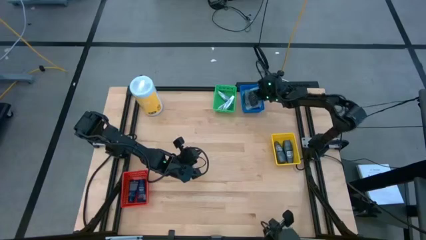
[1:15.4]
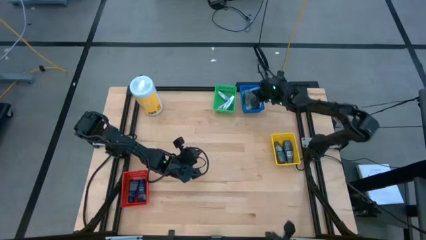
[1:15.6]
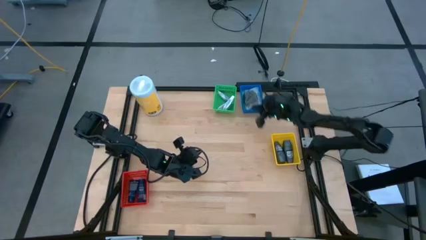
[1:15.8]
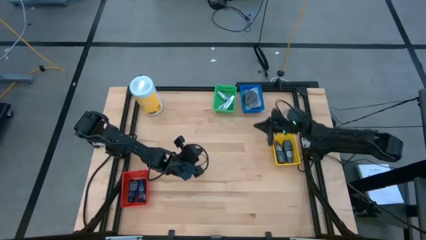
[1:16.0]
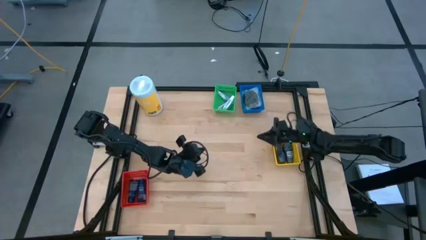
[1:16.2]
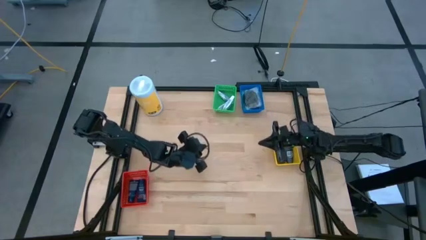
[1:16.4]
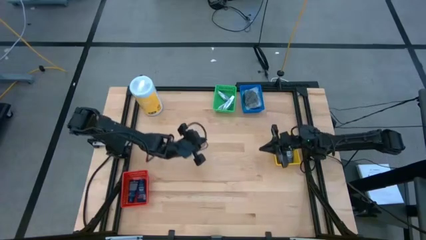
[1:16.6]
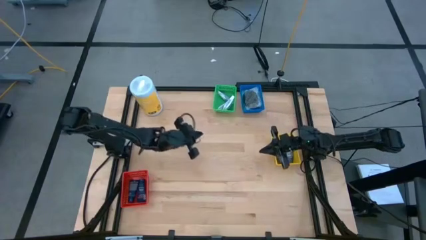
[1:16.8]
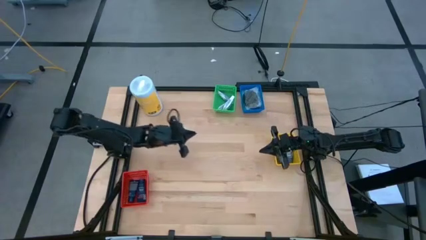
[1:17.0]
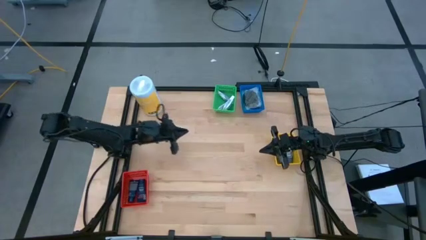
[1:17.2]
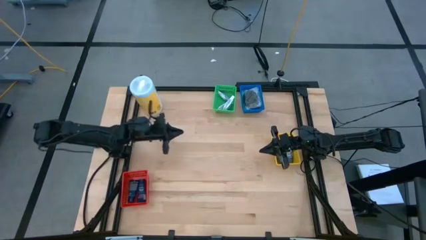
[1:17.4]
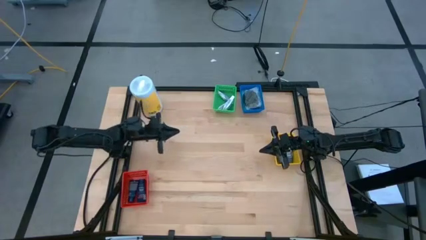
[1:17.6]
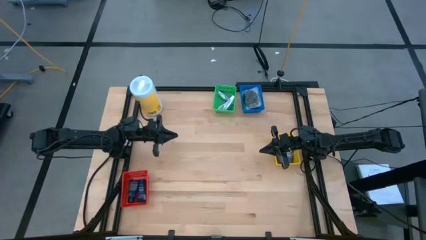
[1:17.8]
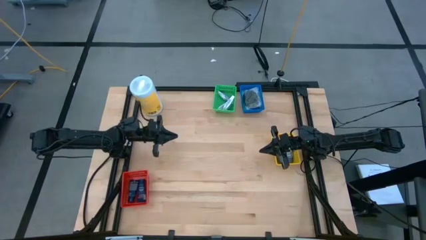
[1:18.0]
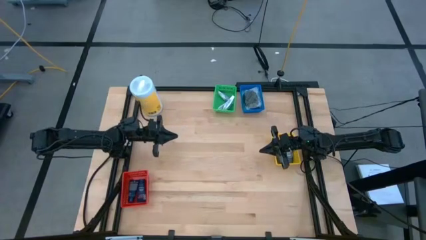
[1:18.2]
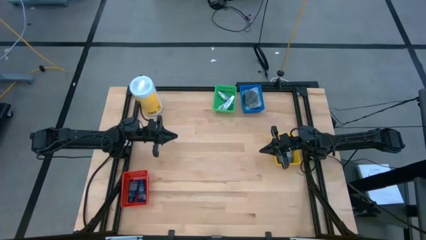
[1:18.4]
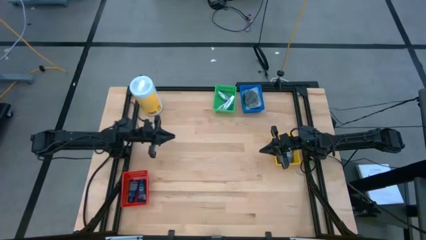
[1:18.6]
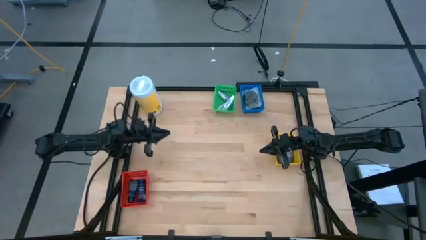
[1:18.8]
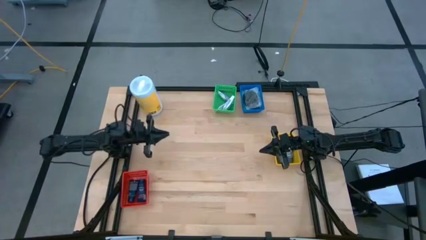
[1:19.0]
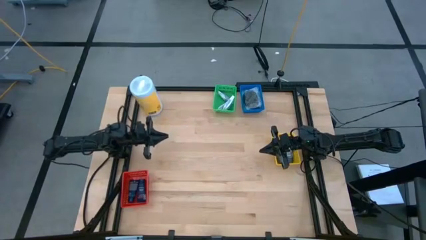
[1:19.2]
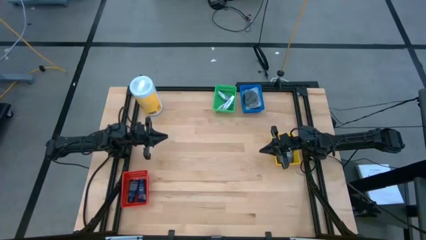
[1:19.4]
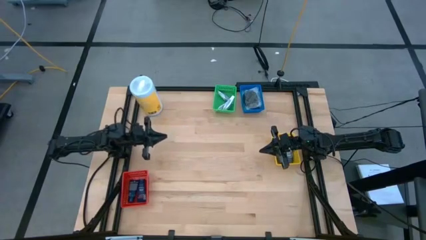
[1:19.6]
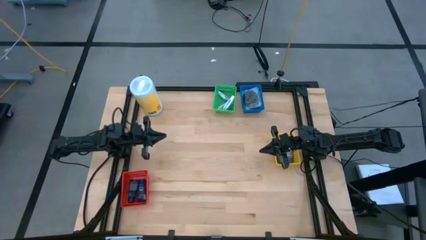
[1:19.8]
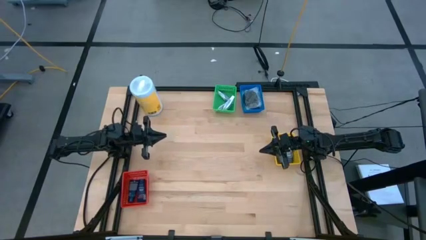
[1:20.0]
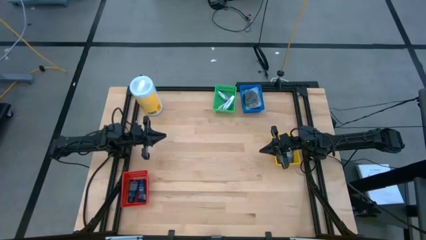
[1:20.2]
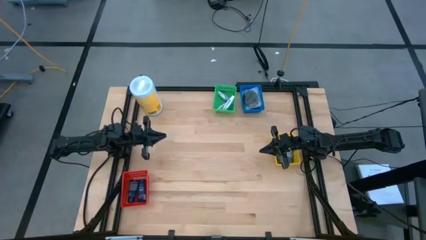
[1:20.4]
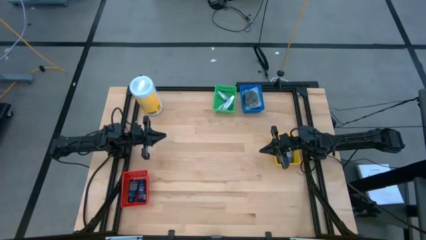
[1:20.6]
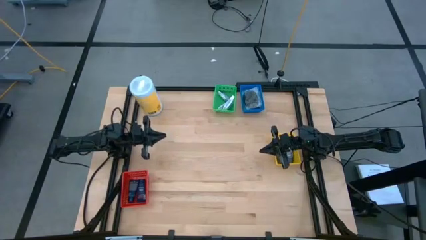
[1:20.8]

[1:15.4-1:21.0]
Task: Pick & Place Travel size toiletries
Return to Home Position

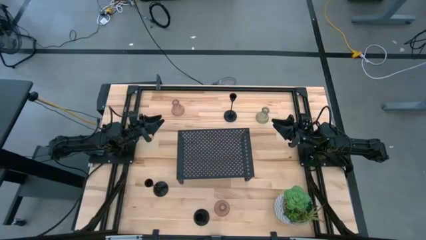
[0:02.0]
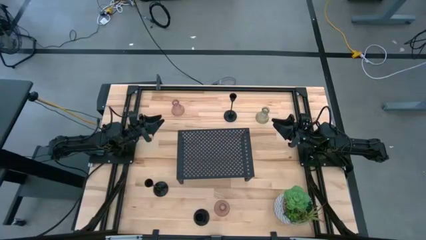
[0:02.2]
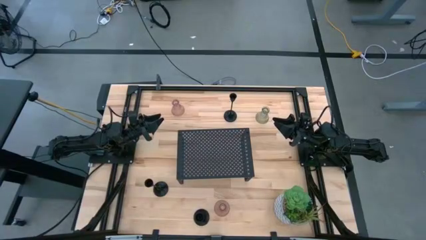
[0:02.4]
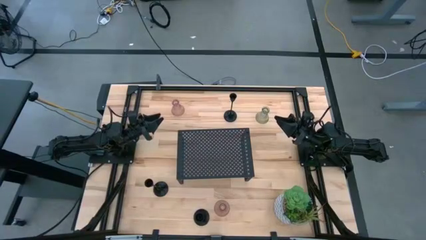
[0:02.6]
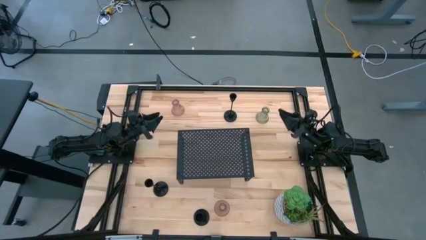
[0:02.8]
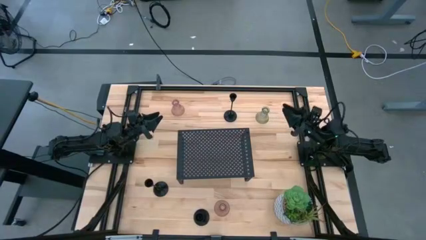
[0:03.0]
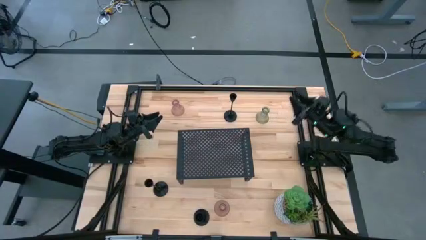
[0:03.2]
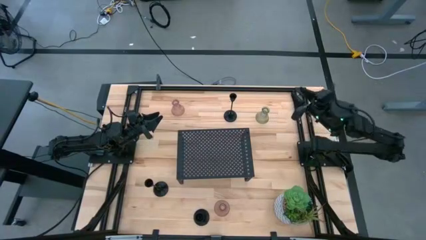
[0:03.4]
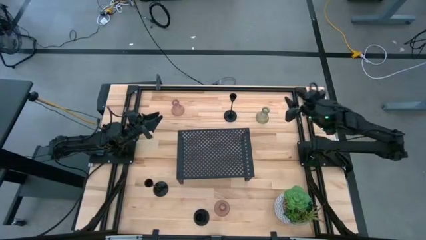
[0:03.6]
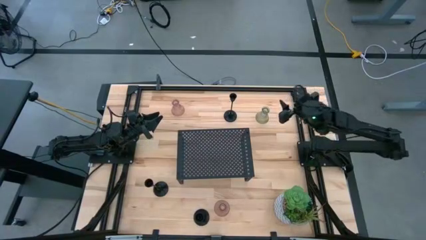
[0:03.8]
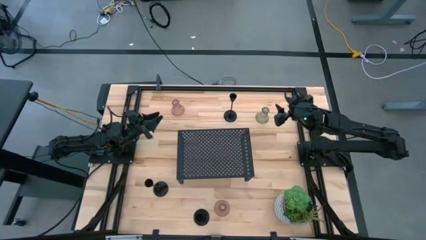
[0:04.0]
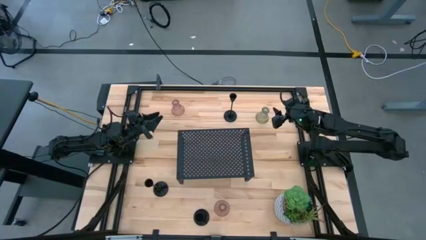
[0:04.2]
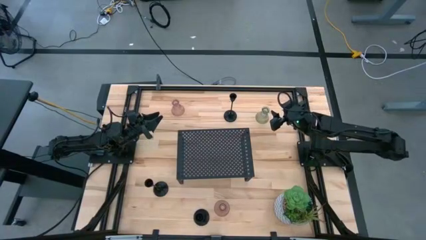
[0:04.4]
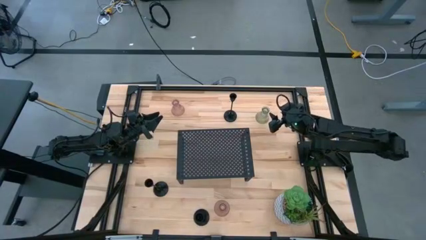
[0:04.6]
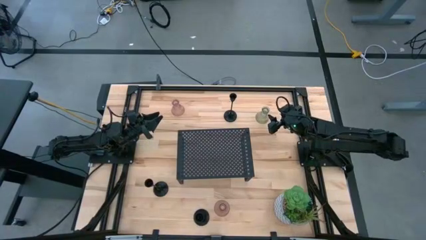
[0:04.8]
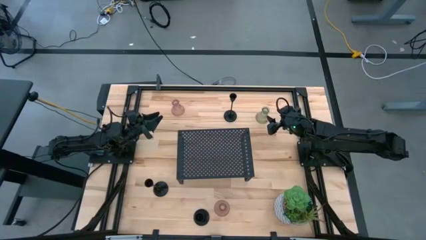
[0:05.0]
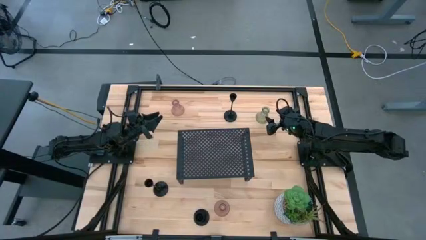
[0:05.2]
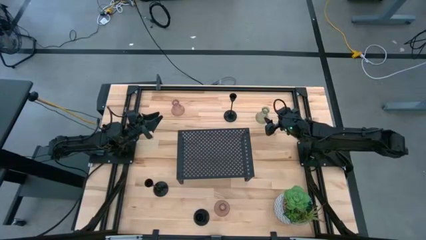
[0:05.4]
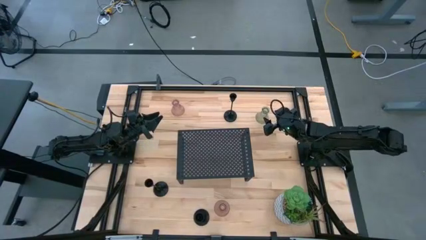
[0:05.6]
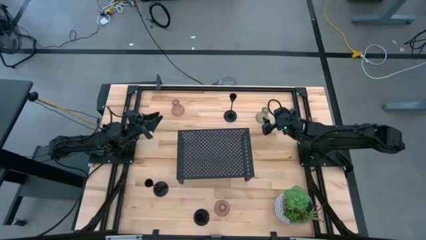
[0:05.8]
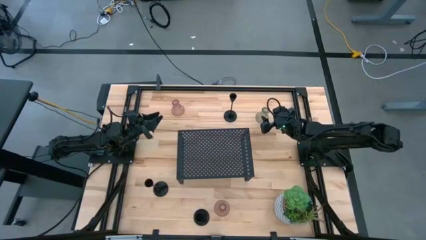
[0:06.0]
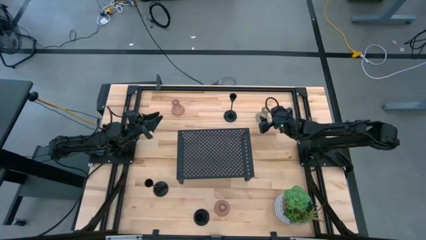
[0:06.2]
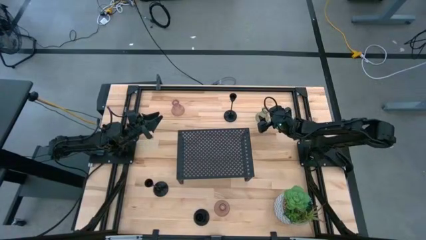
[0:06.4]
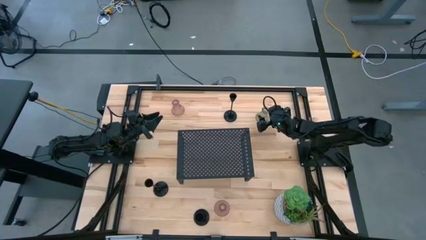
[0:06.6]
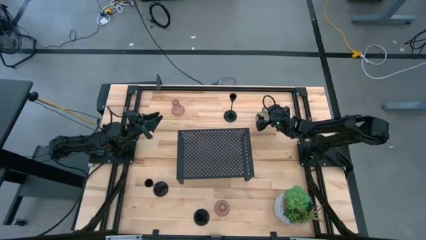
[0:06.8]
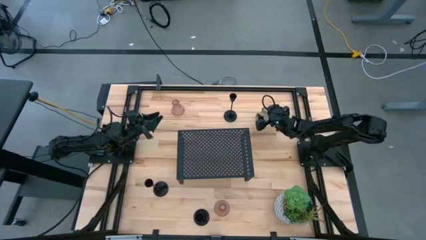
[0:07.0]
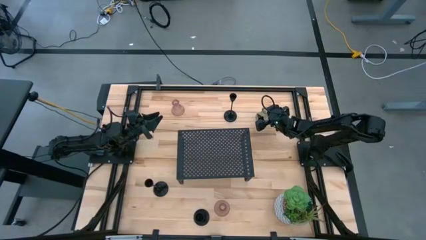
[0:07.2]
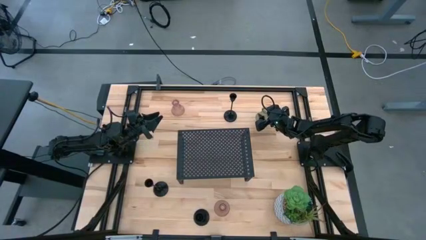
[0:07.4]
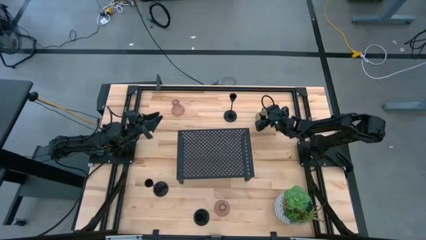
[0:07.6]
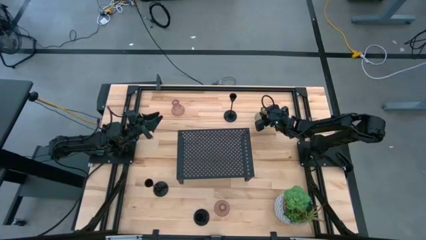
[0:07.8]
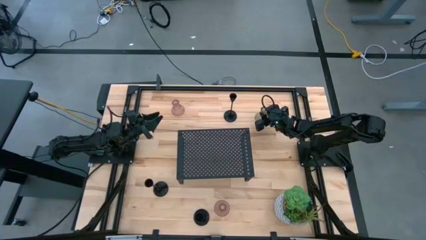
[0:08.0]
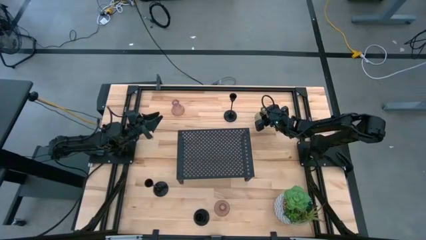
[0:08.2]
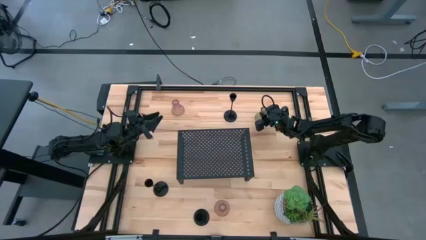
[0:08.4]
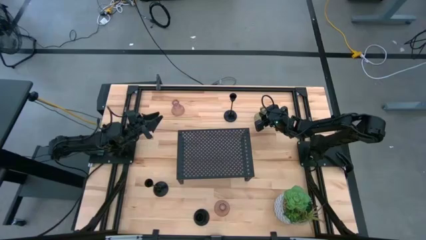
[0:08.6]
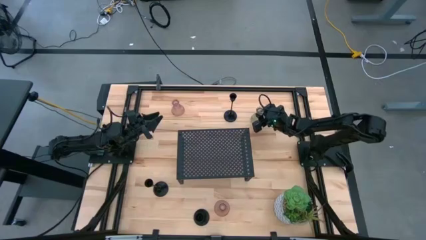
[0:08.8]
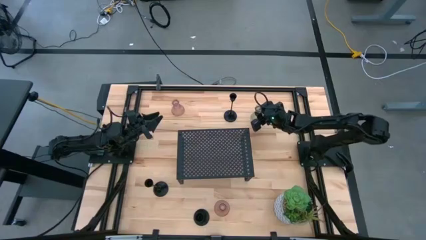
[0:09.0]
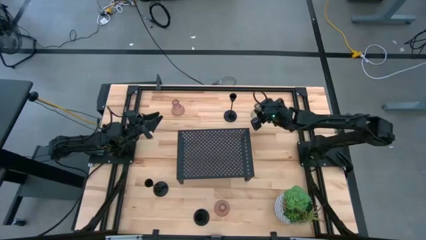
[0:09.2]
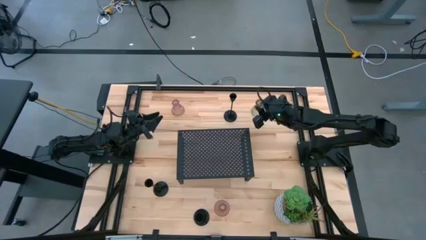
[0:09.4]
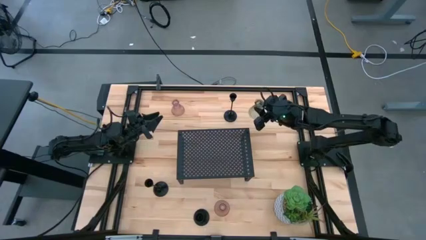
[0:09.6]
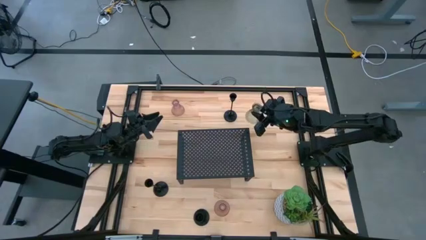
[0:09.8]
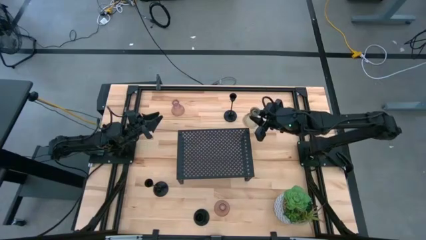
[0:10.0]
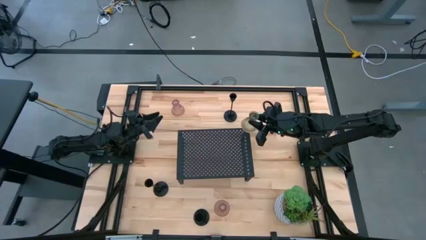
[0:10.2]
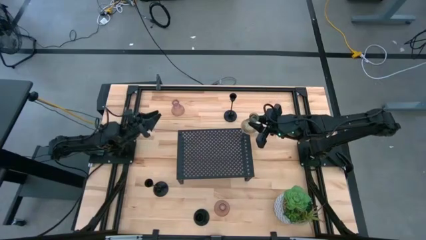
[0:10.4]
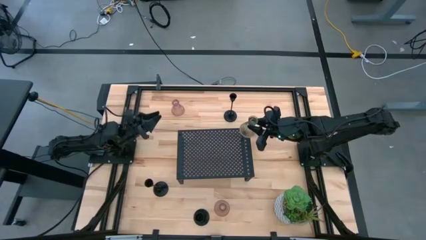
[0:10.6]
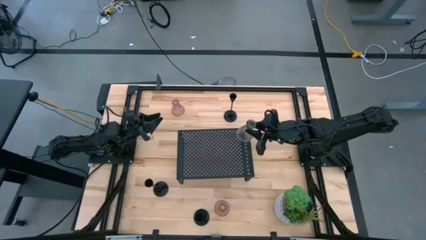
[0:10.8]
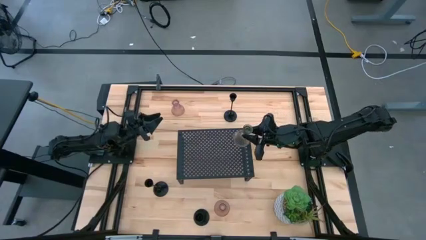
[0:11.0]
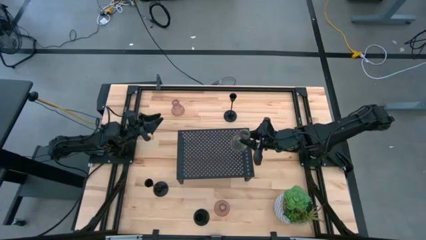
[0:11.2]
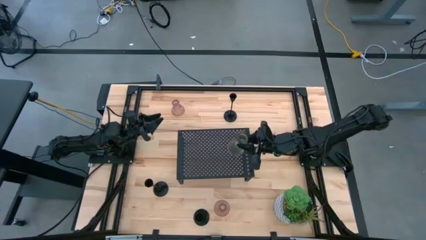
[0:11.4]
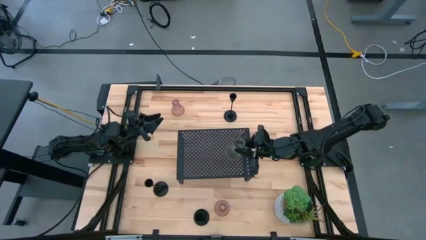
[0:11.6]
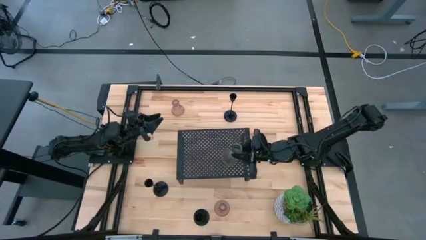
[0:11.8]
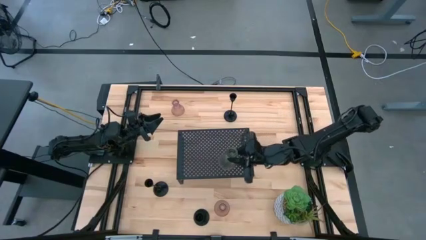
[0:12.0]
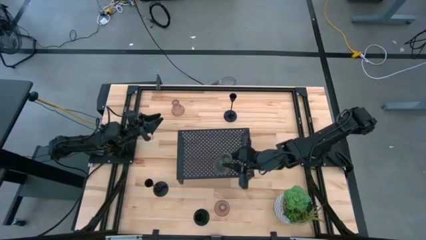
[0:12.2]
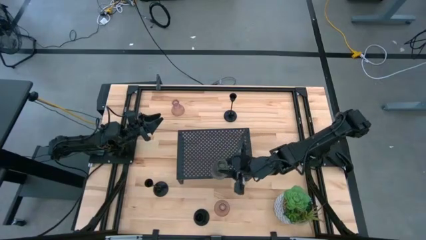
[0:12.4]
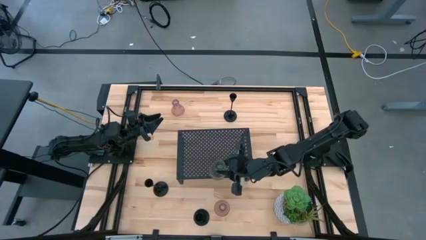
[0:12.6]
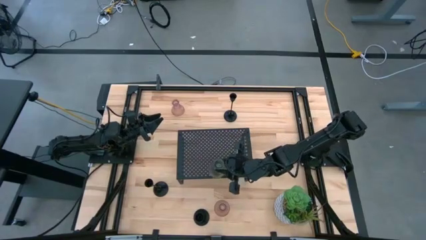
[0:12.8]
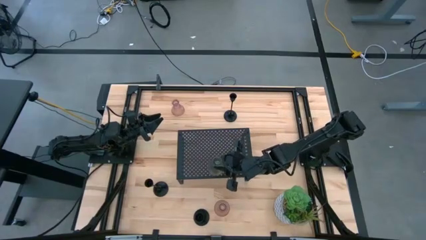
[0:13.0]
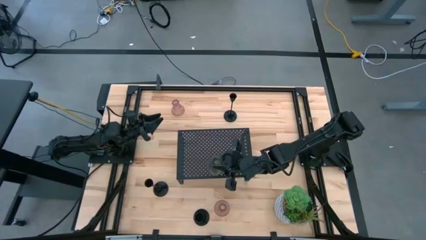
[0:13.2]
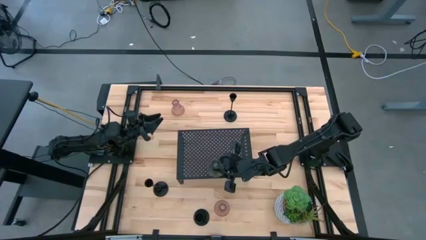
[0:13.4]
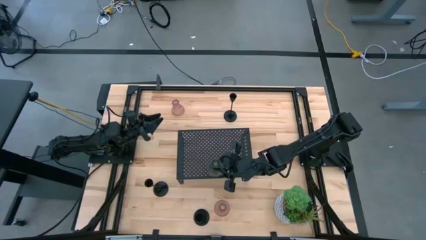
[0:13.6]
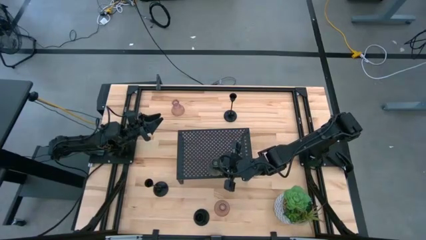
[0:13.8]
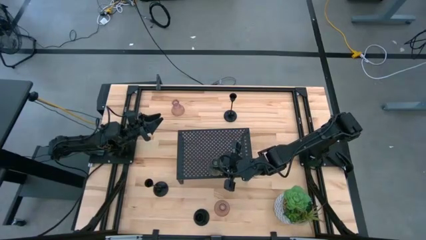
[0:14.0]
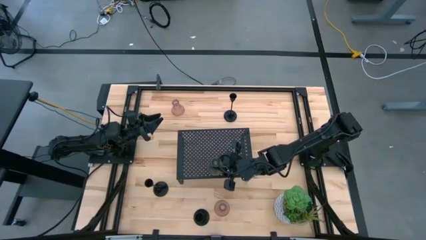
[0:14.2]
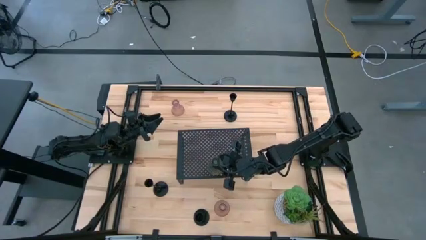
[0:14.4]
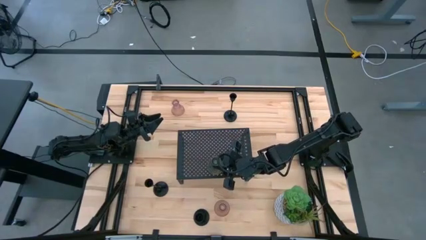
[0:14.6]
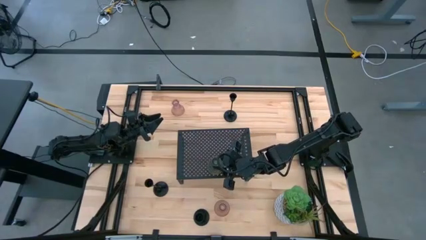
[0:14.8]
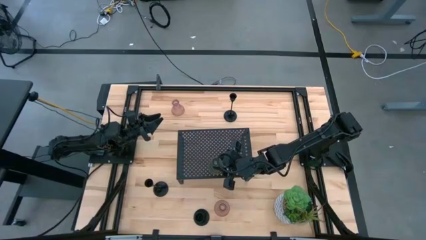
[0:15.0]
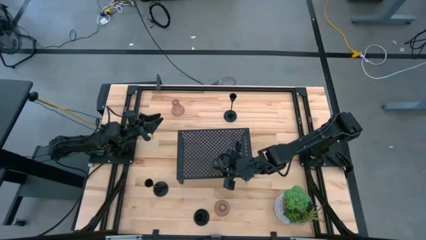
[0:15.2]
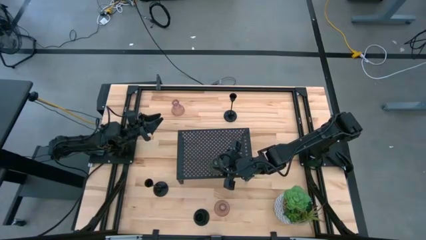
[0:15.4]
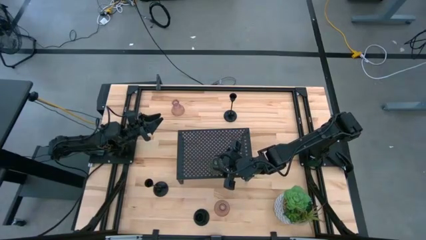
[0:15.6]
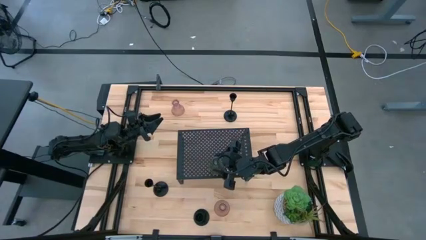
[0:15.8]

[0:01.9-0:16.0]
Task: Pick & Place candle stick holders
Put the green candle holder on the shelf
